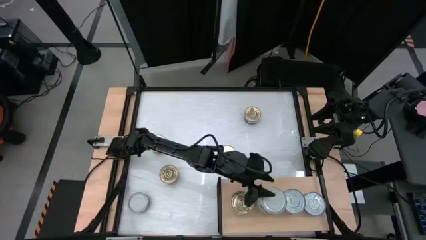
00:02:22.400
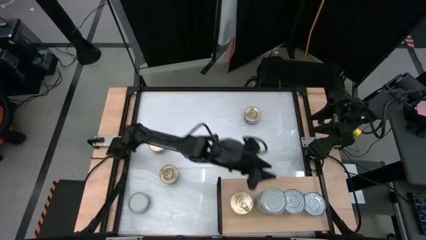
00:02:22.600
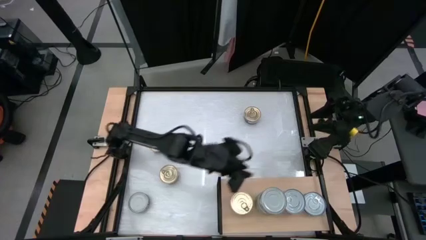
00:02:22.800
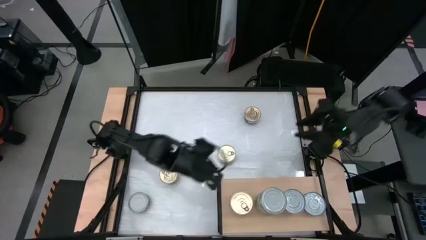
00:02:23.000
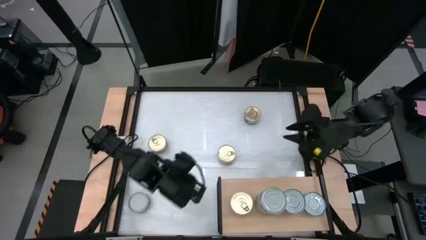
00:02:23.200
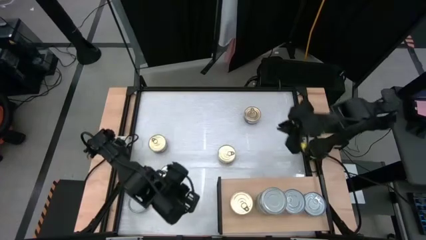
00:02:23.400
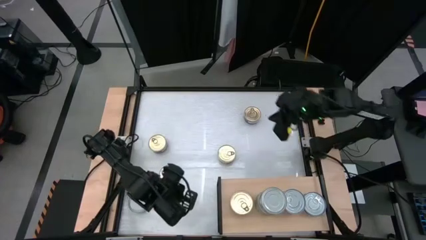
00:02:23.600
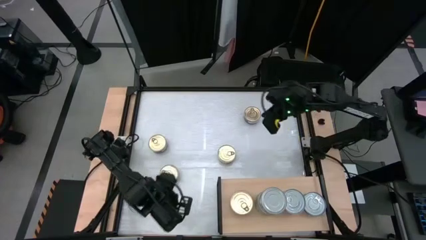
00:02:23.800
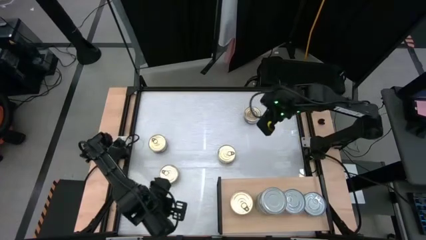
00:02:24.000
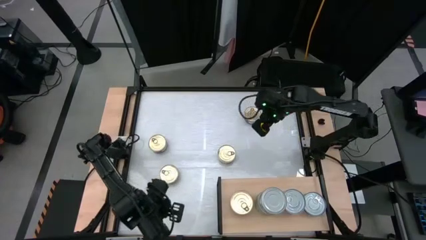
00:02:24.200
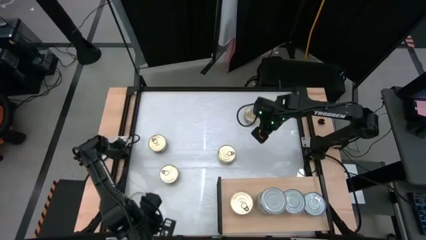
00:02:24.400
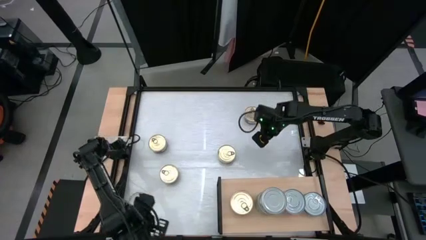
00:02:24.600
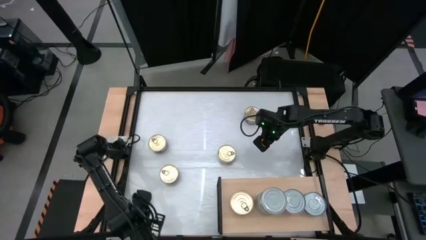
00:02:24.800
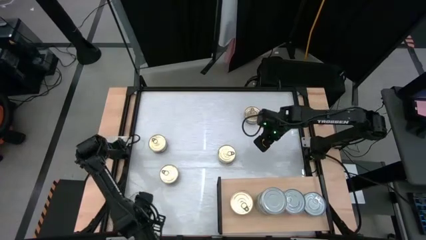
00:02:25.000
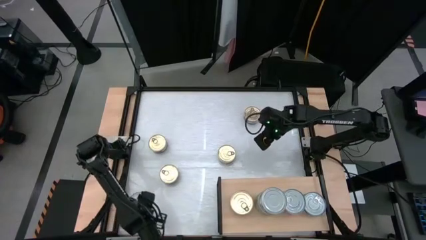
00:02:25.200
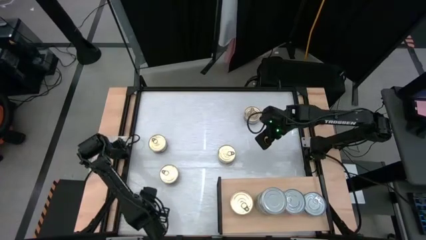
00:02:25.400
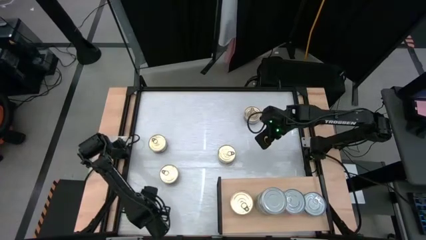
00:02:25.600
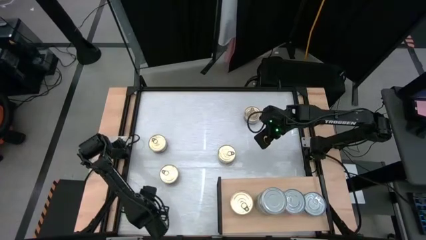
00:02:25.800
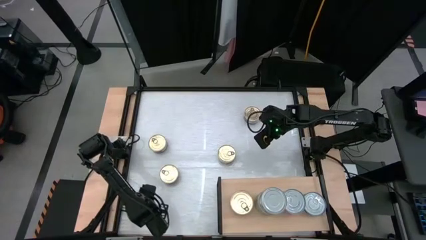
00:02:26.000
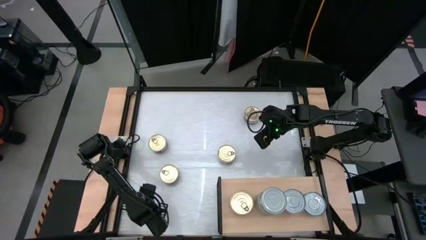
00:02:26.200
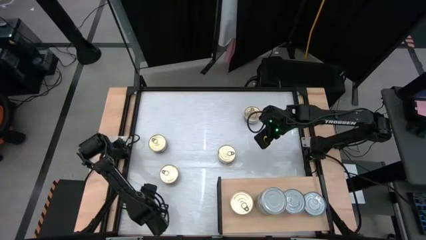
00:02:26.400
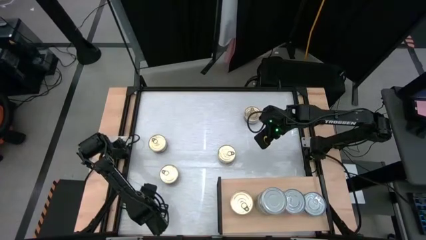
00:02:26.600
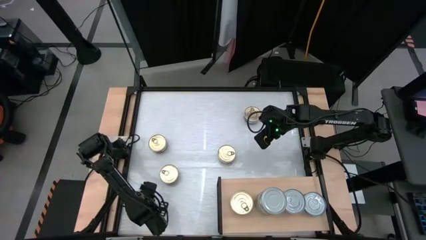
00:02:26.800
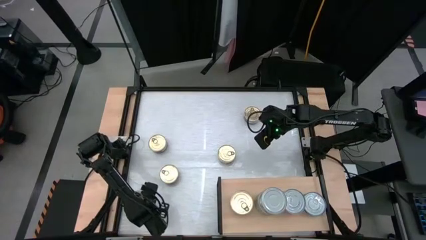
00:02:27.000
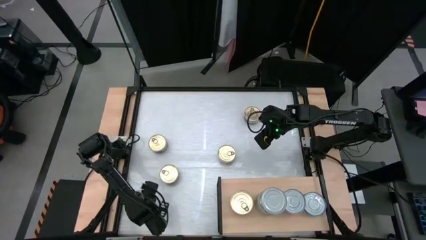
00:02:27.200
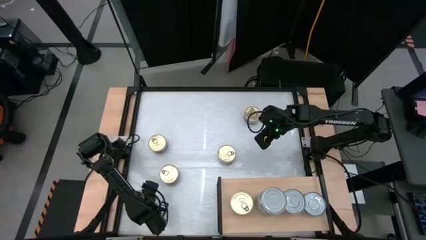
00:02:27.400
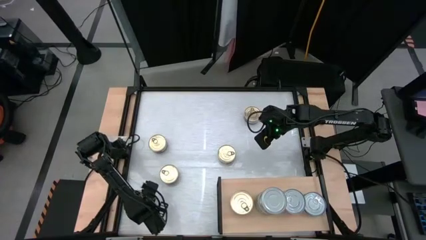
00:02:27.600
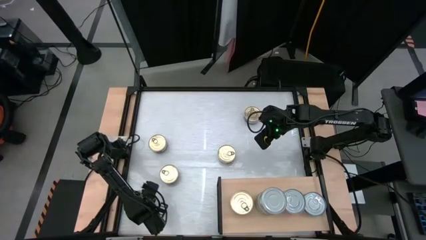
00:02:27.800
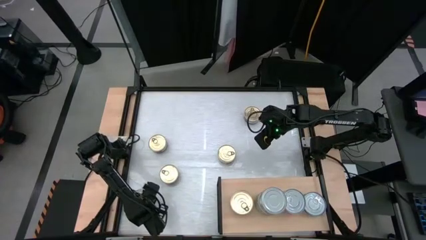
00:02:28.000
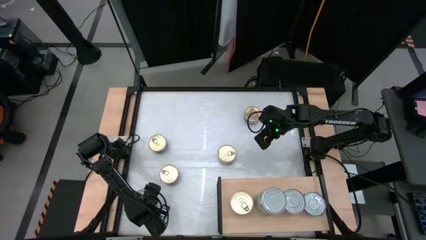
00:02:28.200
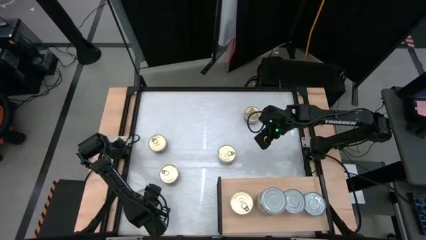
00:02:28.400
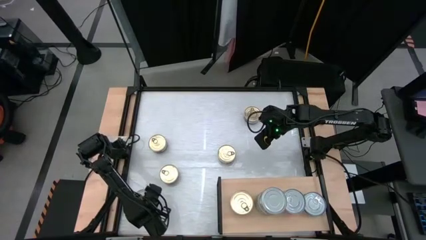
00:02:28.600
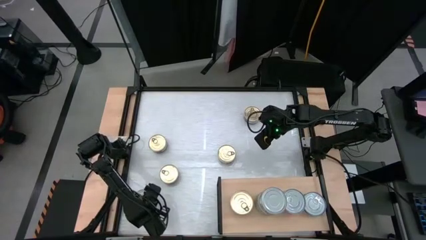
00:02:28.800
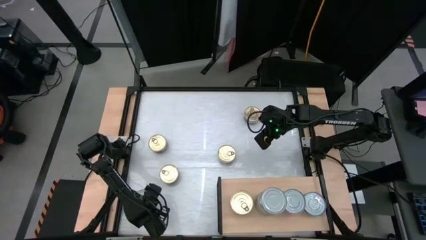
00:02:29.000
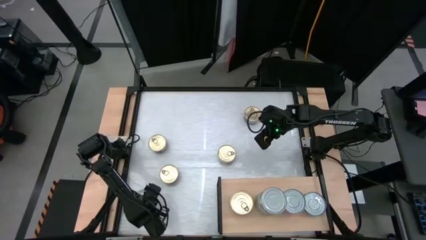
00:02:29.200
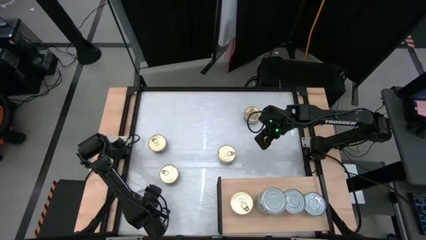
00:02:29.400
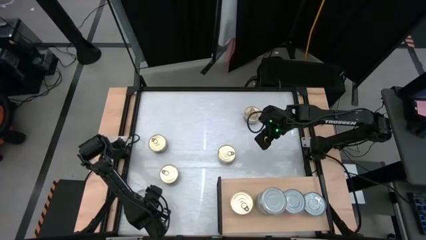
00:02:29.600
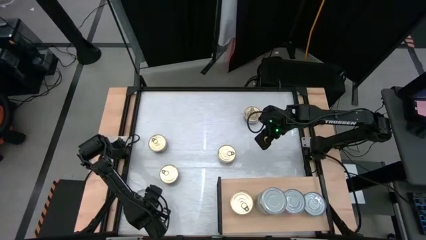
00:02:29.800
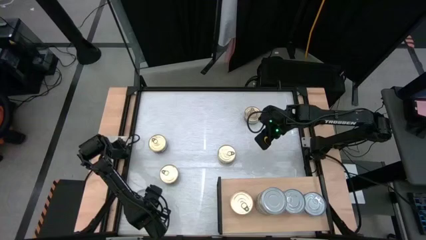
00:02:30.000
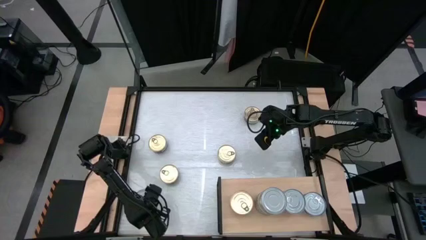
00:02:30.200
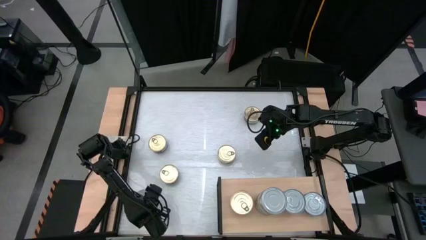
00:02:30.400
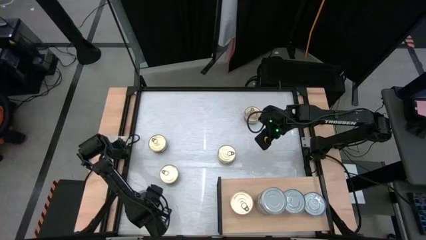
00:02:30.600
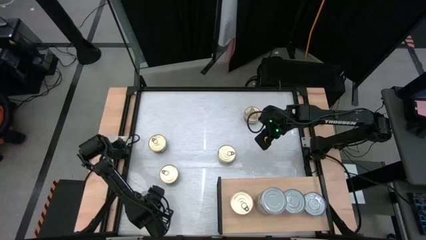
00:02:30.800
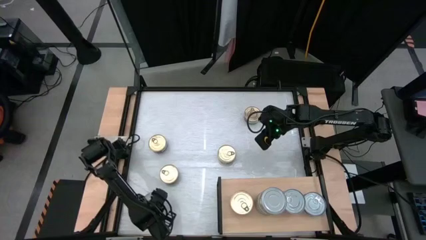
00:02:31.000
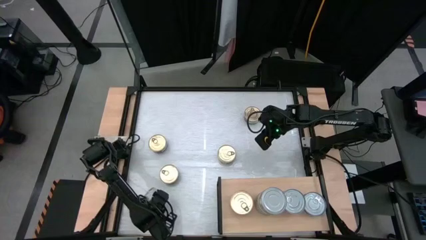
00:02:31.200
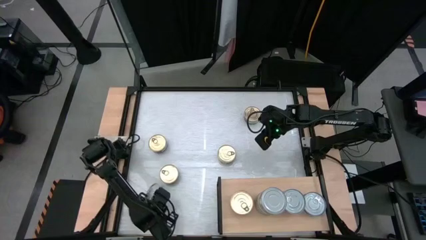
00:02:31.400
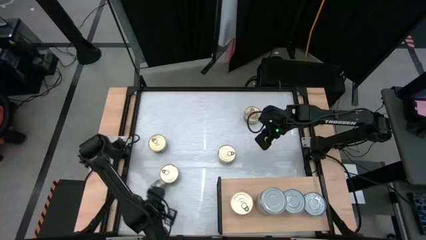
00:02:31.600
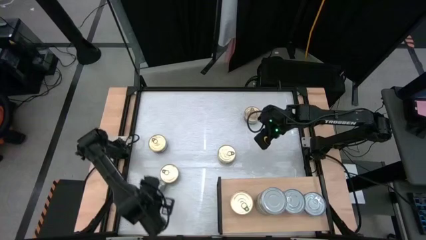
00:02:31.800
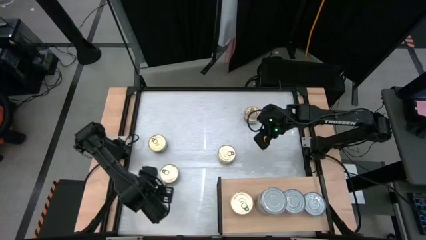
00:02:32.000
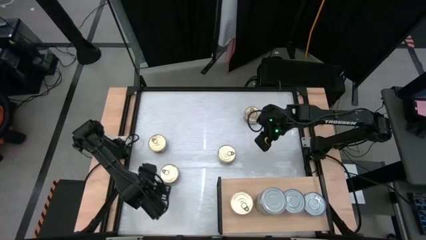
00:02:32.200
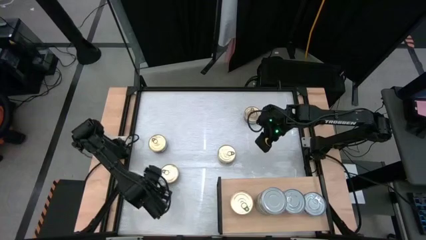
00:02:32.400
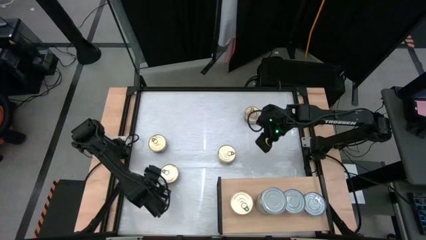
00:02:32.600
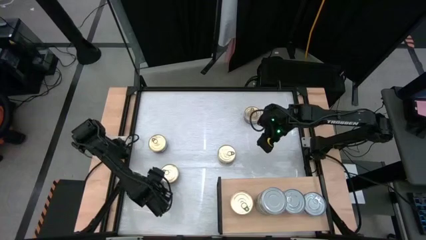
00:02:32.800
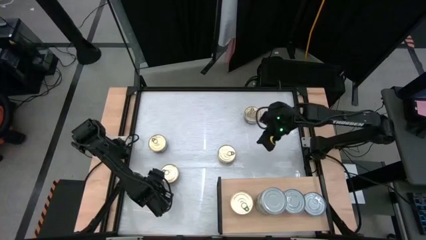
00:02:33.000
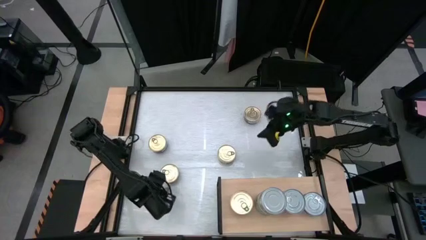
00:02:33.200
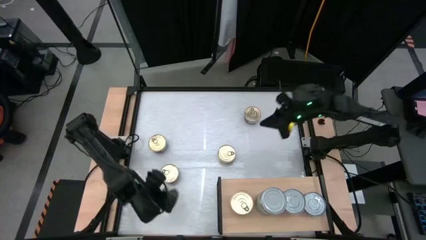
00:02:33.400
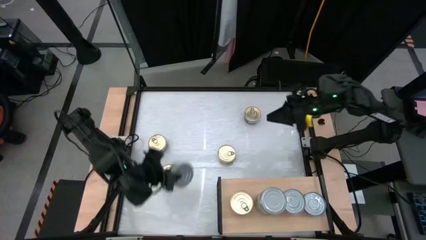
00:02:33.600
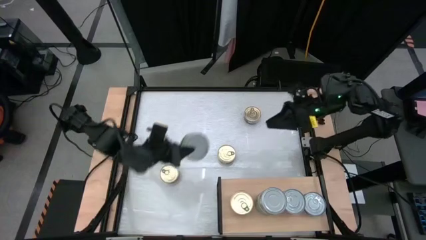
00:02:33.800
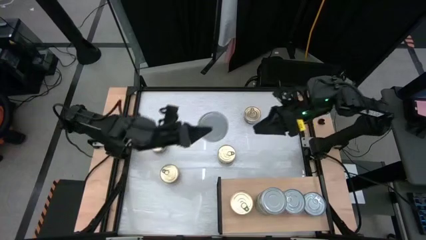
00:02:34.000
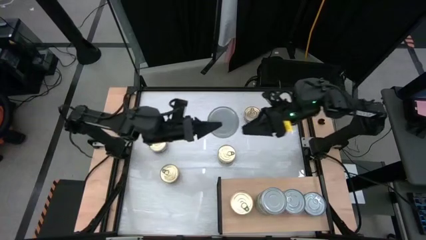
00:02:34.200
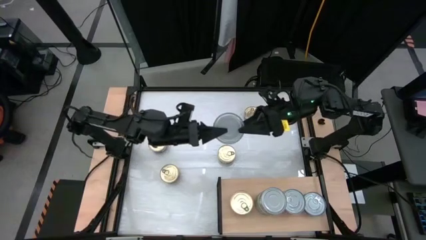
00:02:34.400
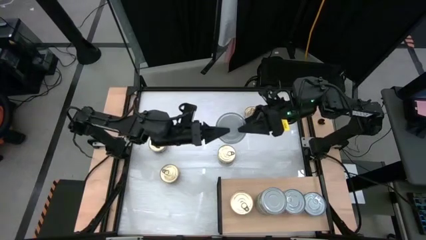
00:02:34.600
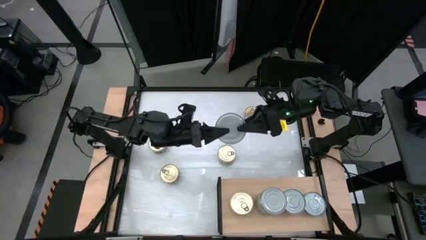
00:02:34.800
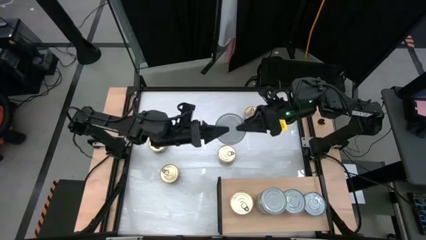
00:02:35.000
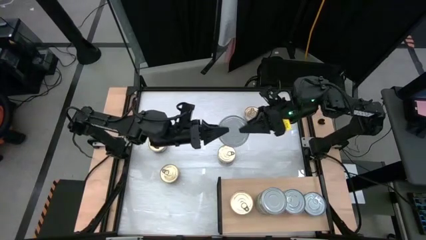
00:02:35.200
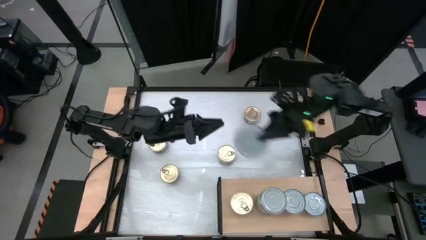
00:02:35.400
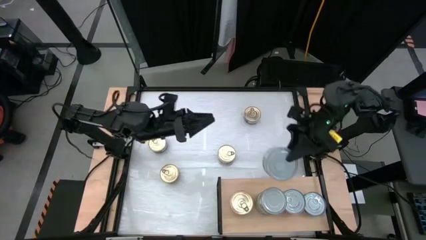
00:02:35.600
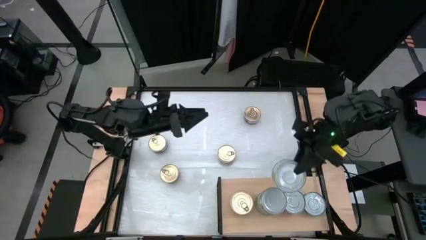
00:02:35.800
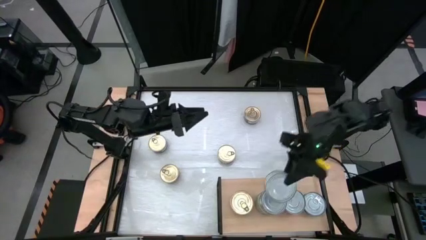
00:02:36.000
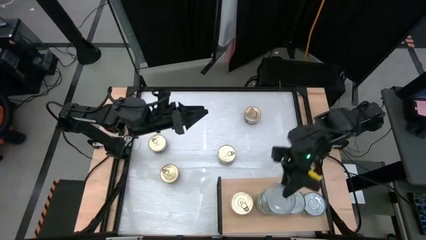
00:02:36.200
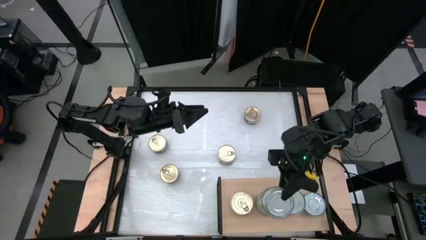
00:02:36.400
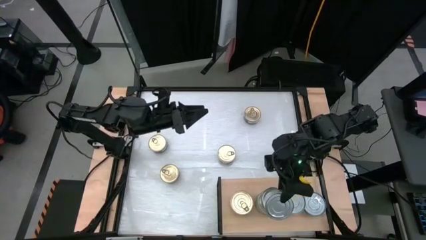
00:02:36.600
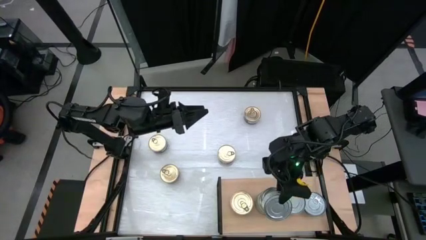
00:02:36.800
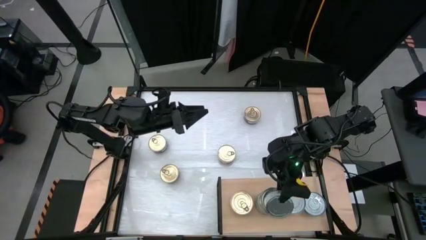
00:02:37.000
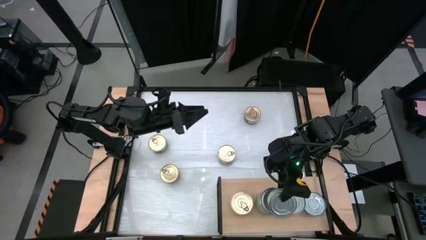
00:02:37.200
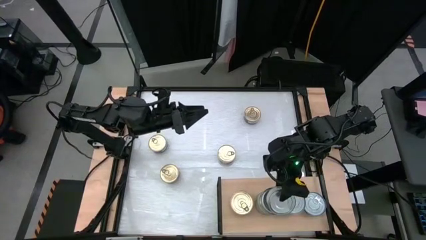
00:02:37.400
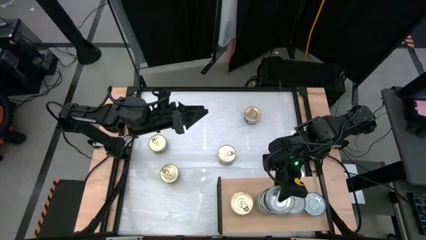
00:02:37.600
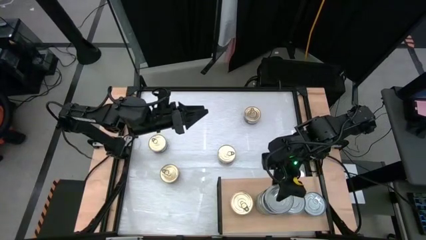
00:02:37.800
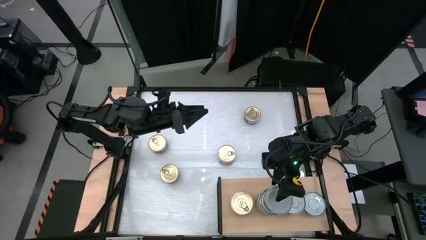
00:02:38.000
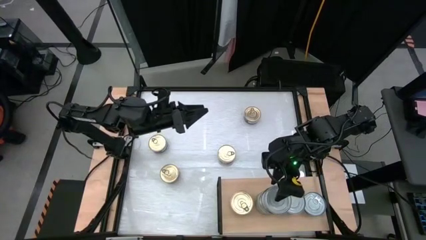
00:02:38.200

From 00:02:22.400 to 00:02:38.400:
Task: Stack canned seafood by type on shelf
Stack the green tuna can on top of the other green tuna can on the shelf

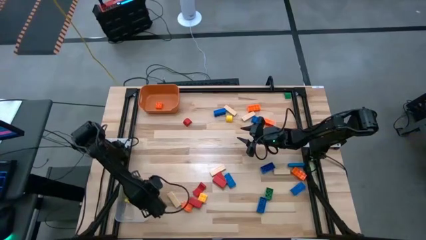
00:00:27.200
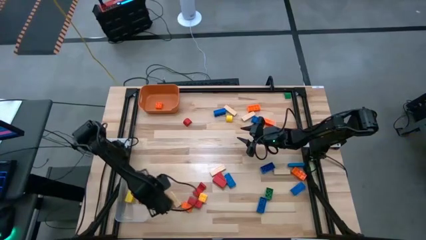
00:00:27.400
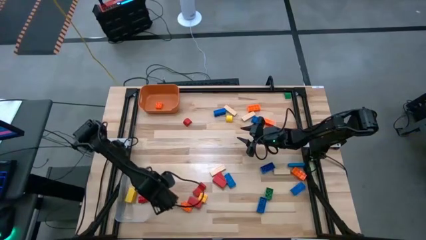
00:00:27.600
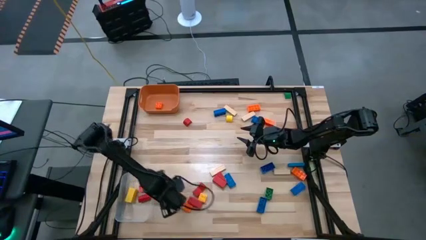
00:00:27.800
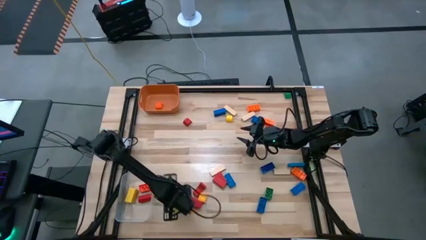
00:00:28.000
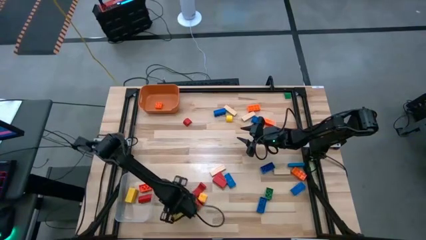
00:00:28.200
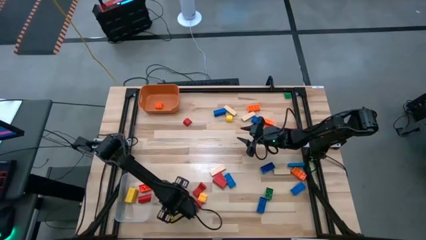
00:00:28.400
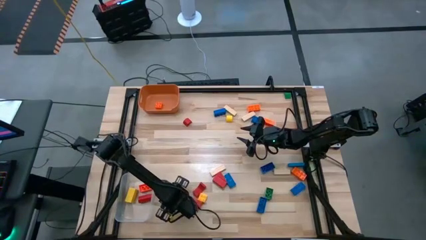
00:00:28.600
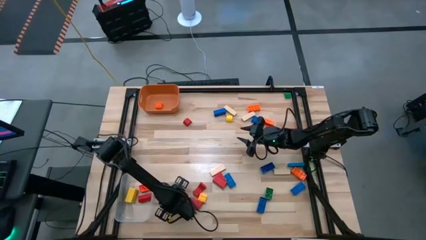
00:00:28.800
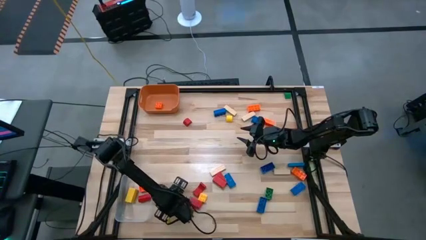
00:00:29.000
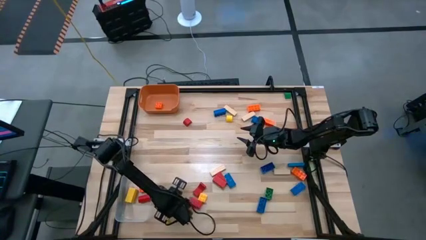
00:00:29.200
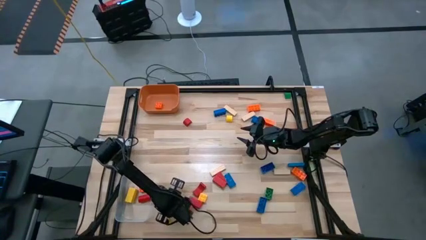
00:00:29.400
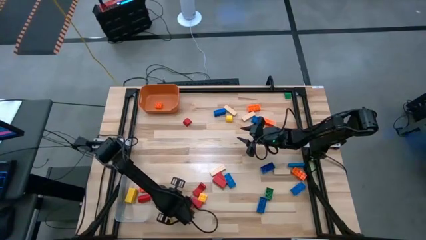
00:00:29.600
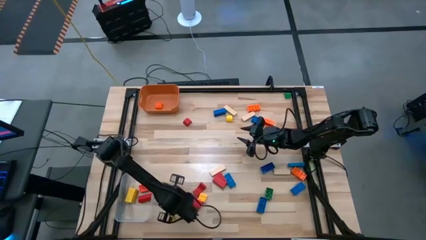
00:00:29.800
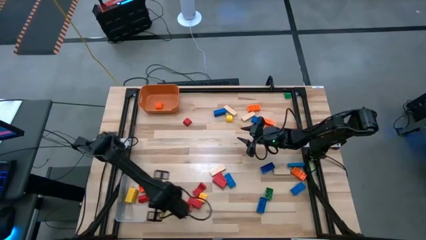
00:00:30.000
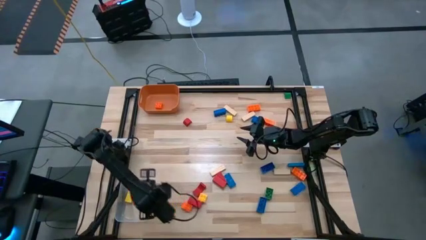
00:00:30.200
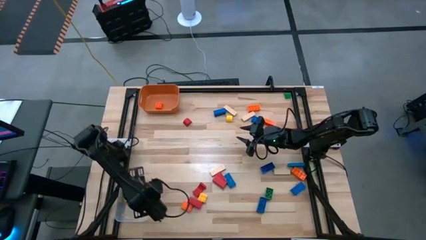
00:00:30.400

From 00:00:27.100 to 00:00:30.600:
Task: Sort blocks by size
Put the large brown block into the transparent bin
